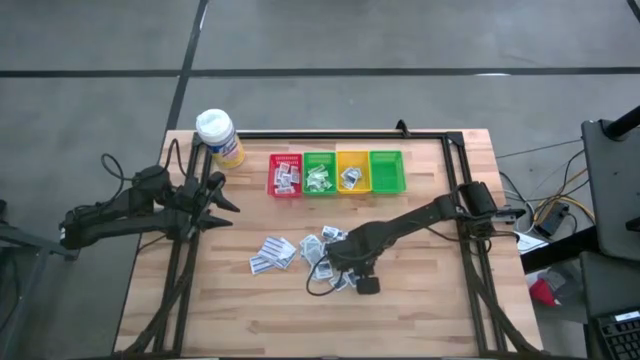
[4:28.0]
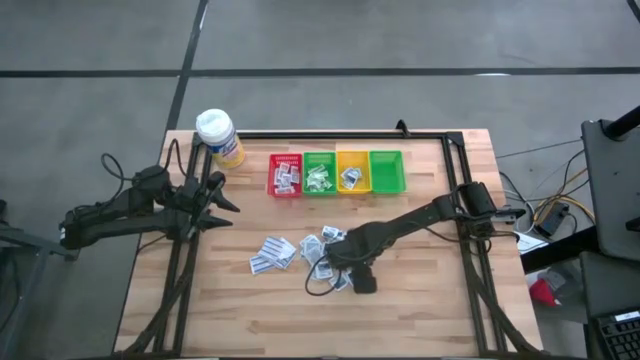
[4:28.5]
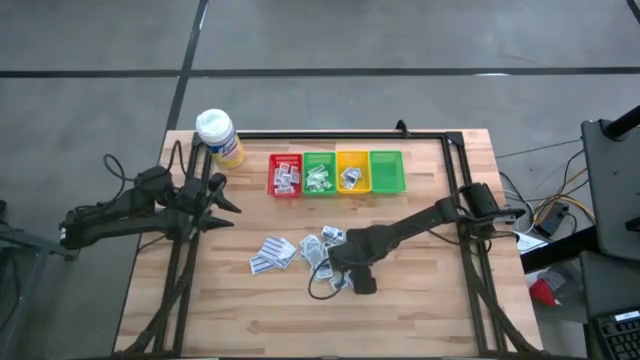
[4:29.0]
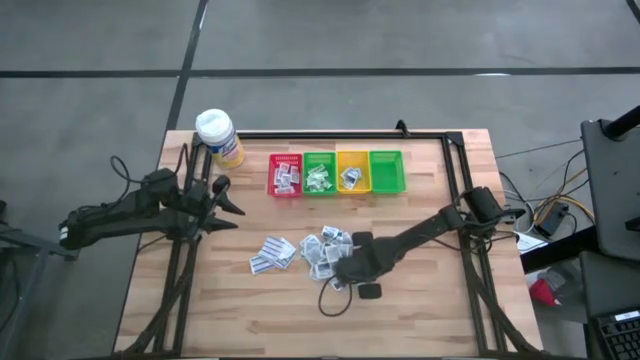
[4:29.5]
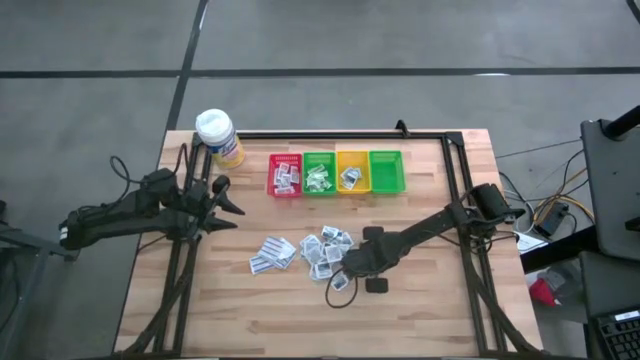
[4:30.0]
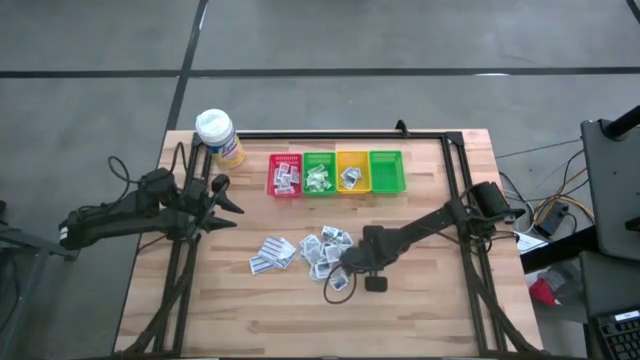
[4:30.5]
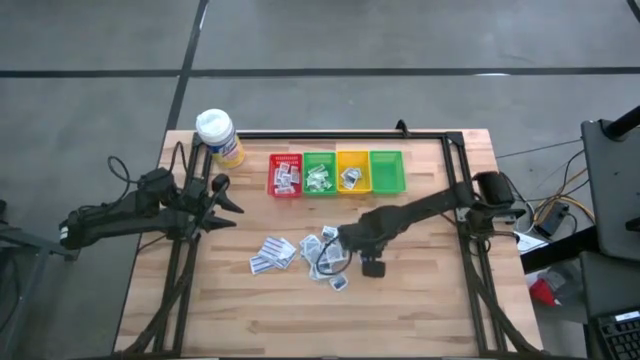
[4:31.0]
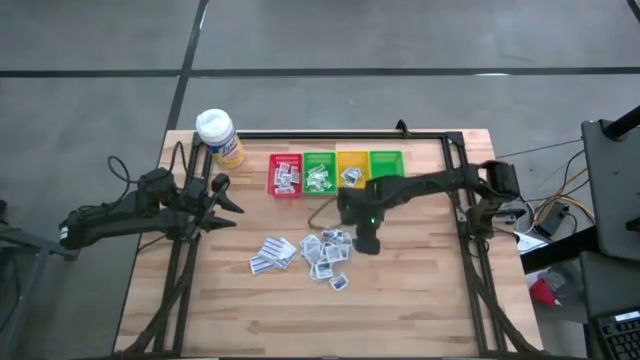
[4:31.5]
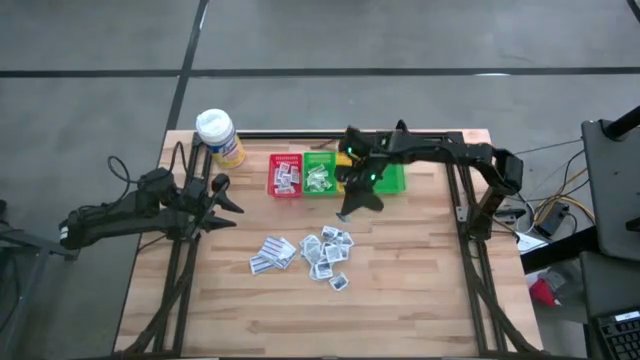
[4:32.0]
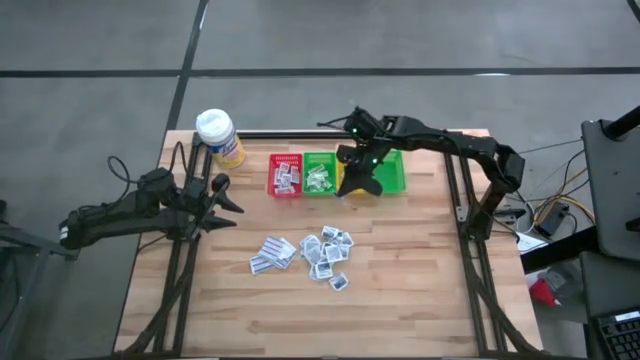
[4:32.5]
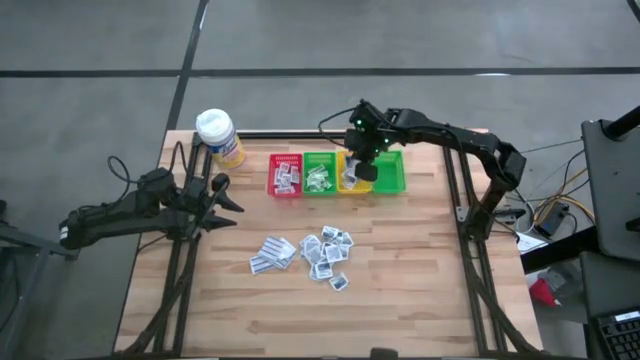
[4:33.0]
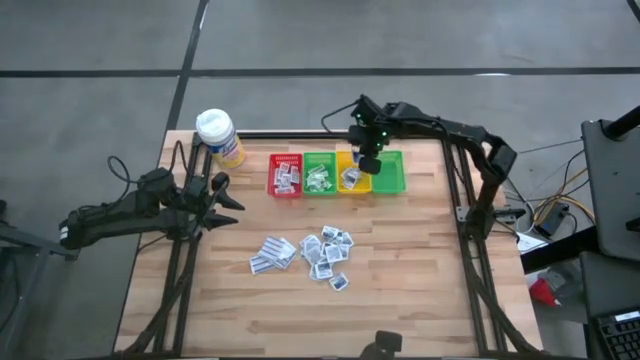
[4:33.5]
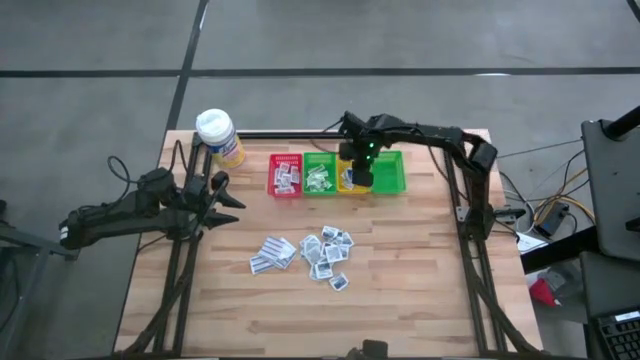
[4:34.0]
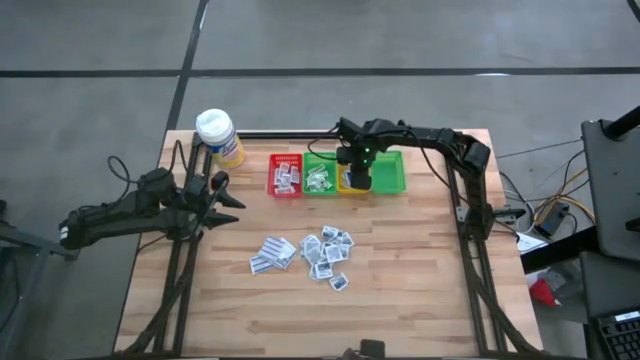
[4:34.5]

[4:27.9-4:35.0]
Task: Pick & Place First Aid Supplies
Put the alcohol pad into the yellow bin

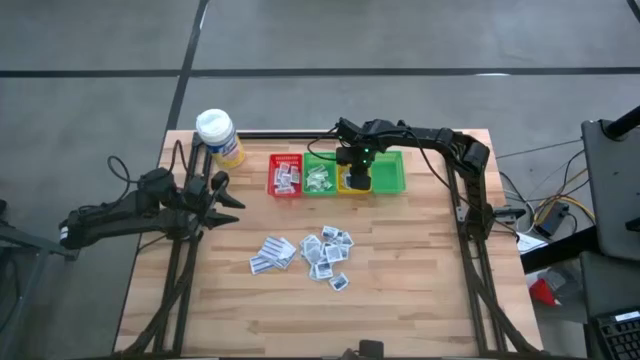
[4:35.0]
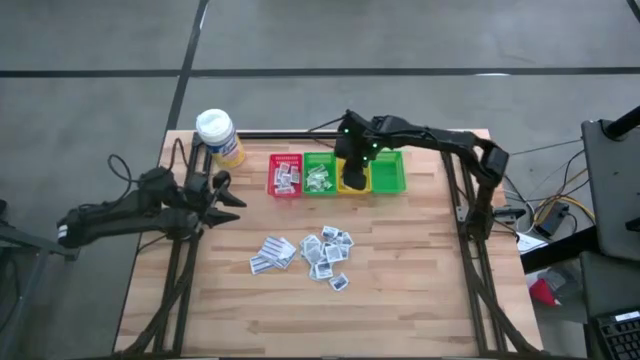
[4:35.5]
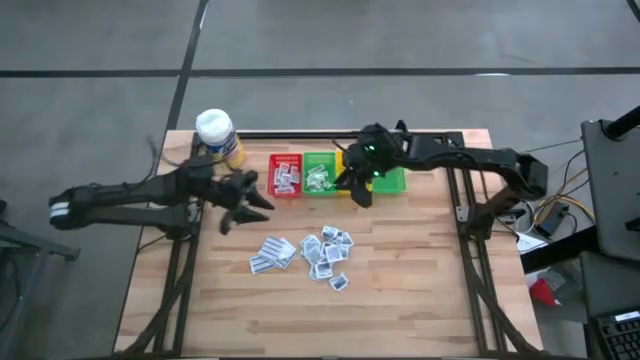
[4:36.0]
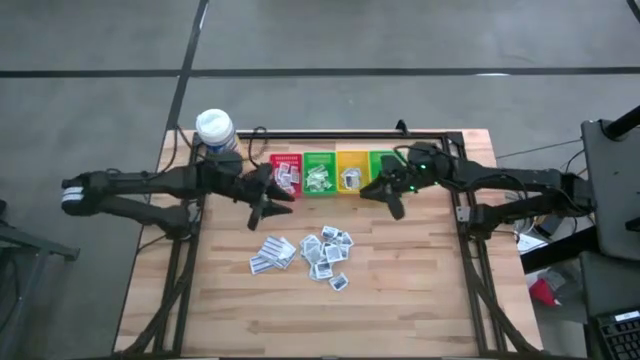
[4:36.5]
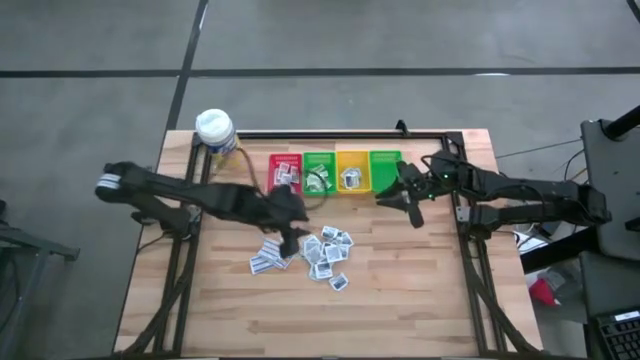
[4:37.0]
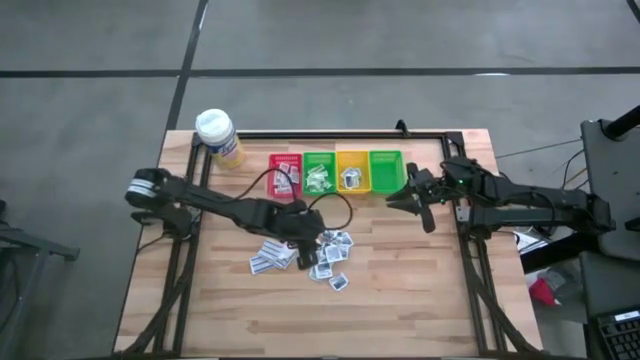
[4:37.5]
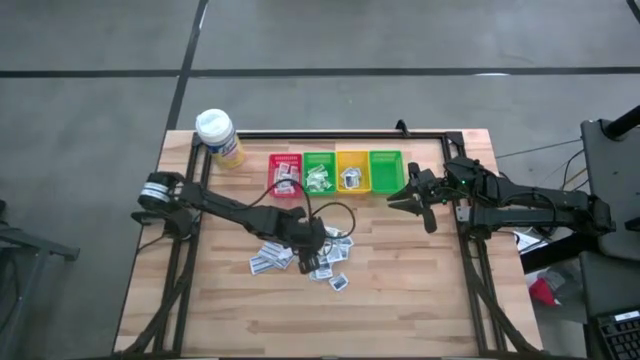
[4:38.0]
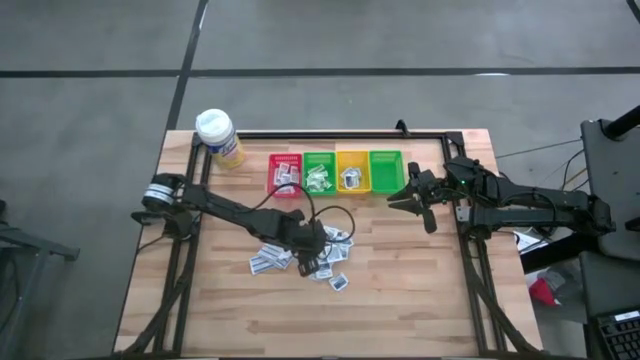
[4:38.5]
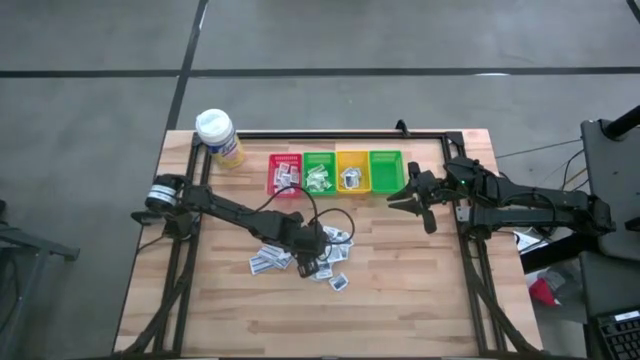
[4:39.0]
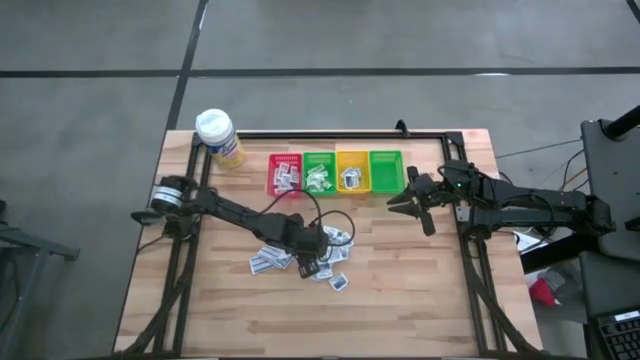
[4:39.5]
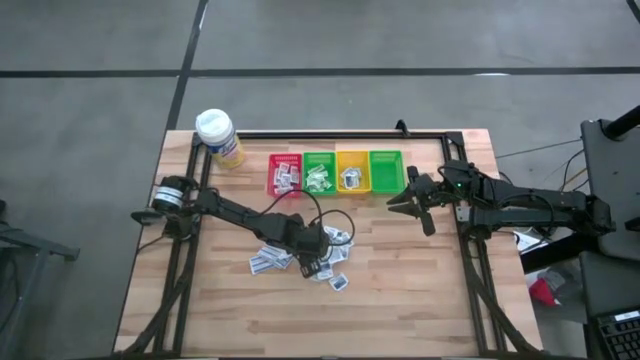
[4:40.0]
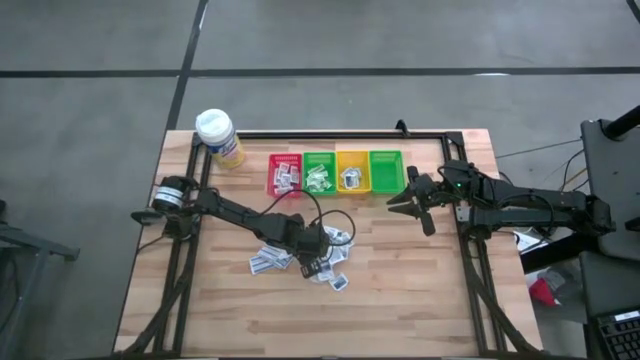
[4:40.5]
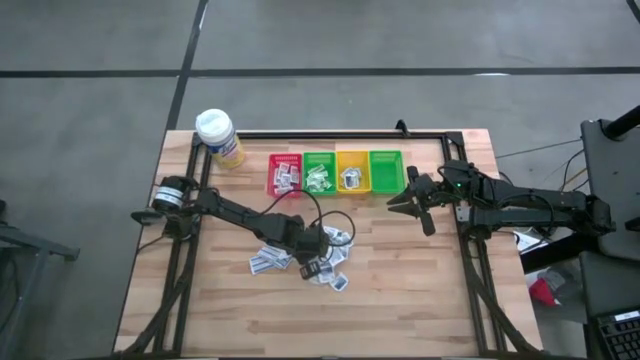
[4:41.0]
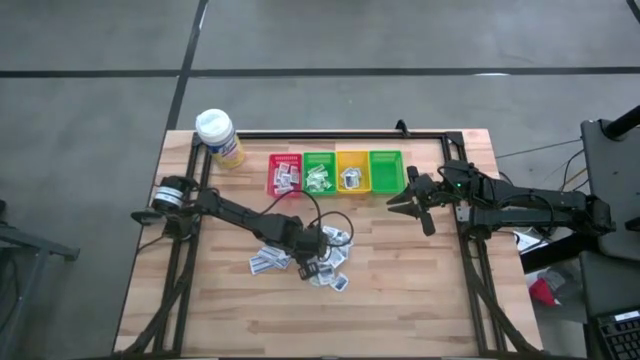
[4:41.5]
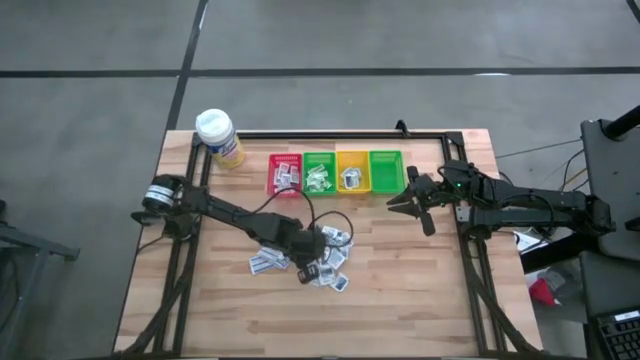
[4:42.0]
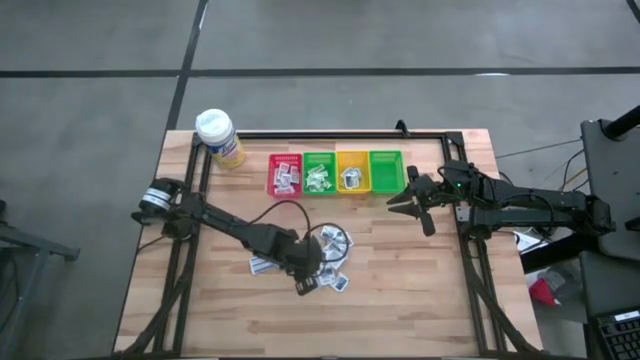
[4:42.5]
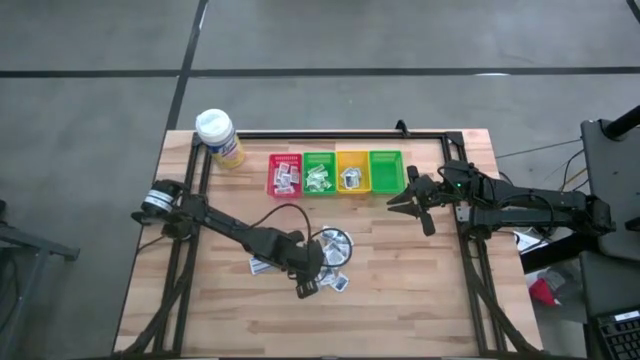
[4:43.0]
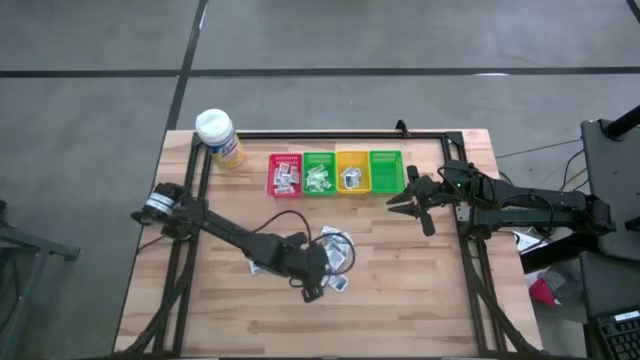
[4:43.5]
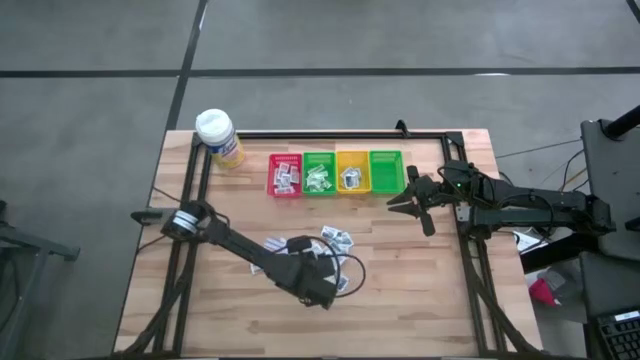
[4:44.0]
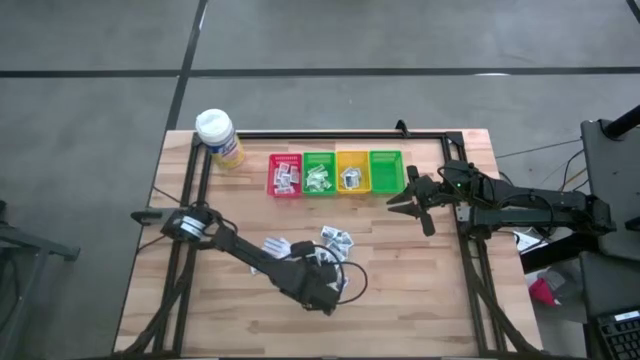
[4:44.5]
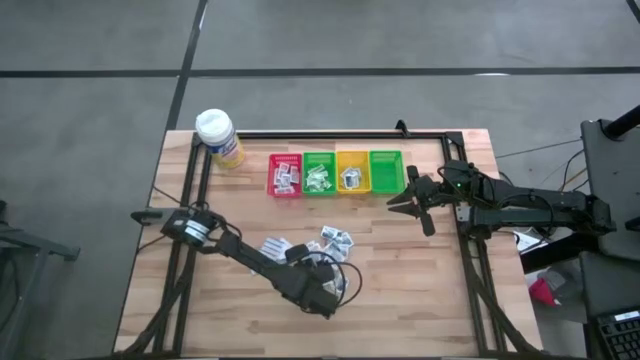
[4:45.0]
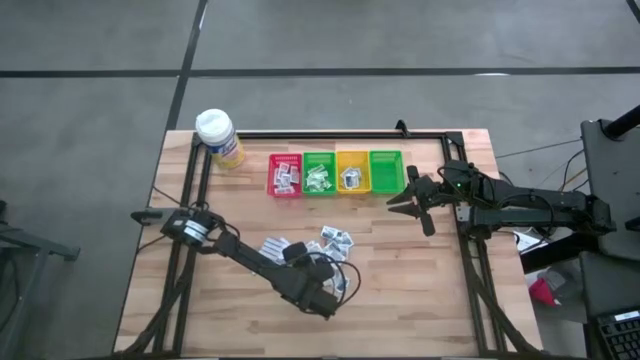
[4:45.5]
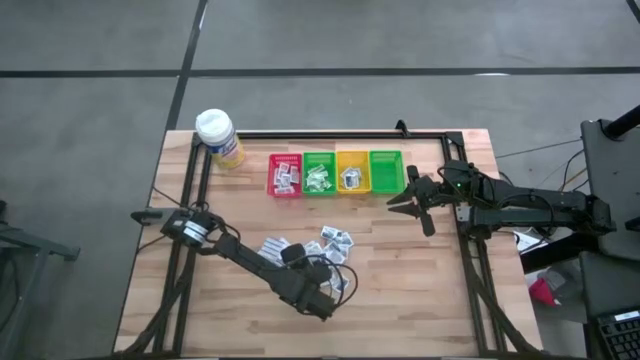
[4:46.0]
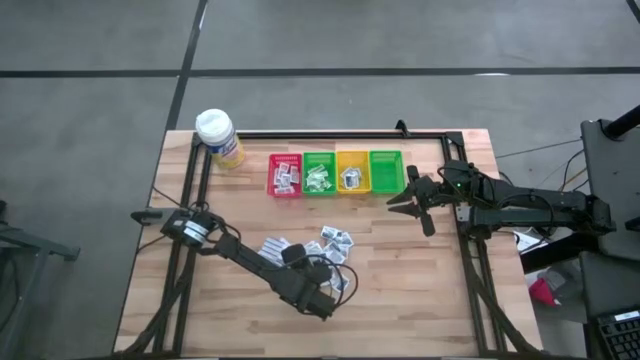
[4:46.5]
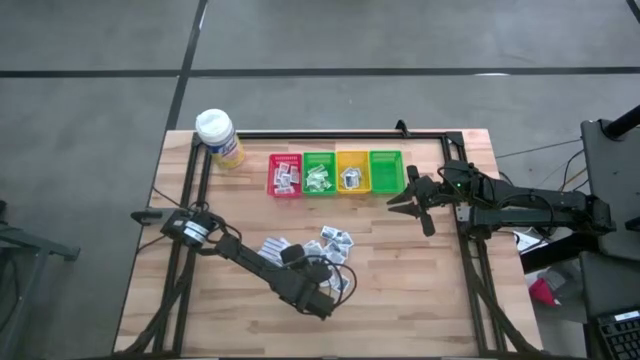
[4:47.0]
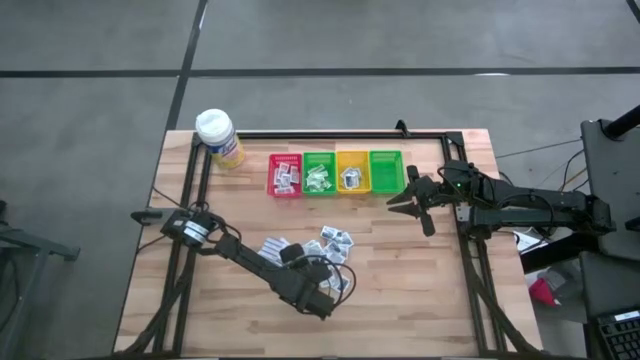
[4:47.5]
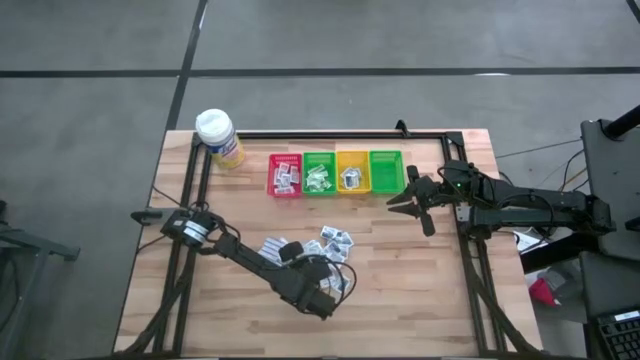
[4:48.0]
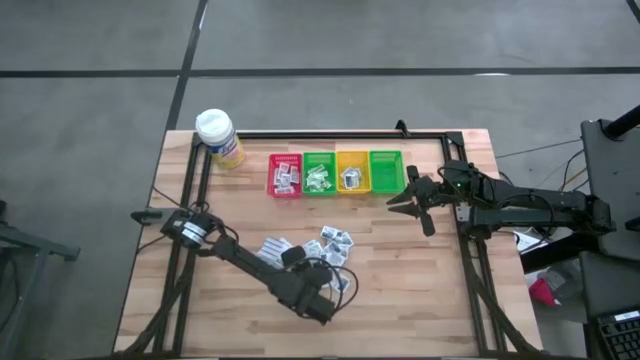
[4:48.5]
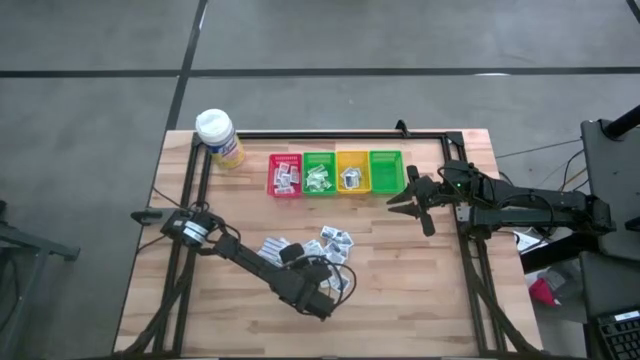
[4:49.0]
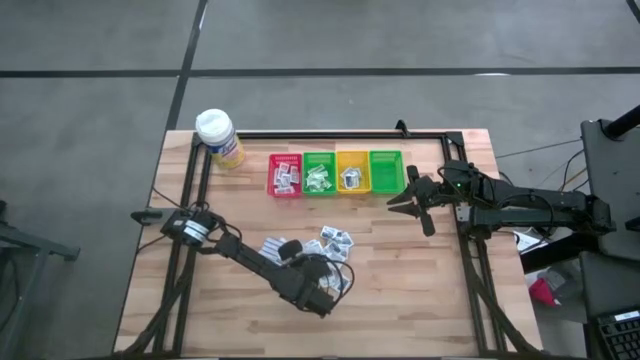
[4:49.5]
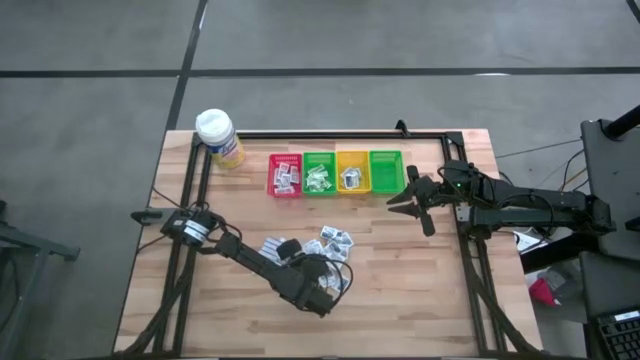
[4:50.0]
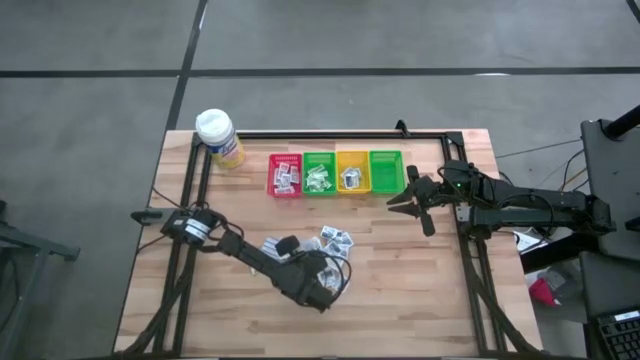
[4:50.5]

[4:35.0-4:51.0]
Put the alcohol pad into the yellow bin
